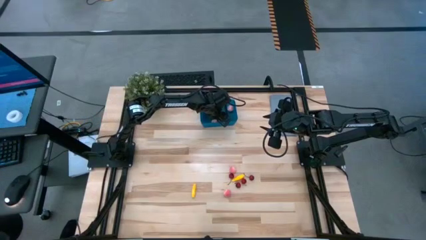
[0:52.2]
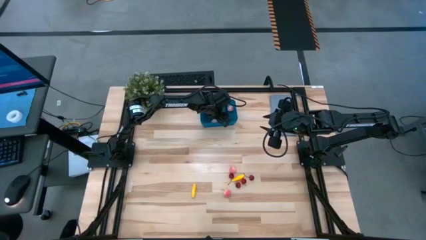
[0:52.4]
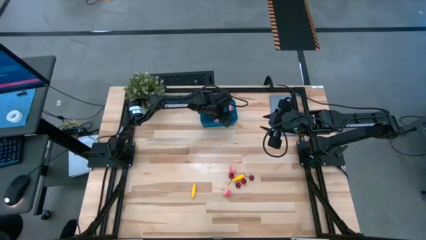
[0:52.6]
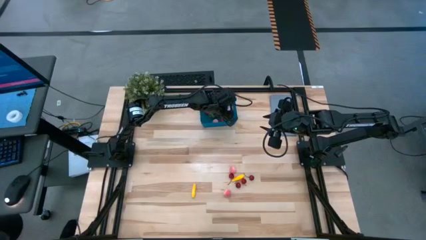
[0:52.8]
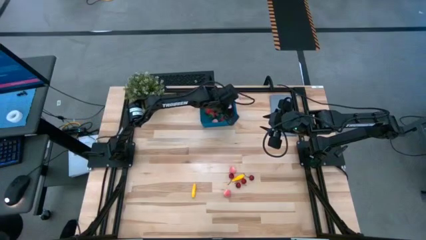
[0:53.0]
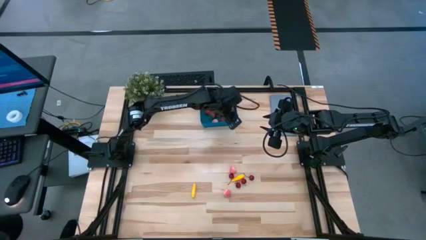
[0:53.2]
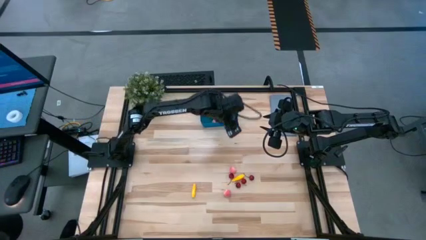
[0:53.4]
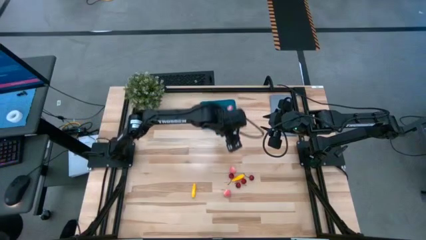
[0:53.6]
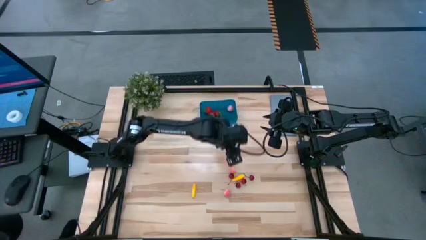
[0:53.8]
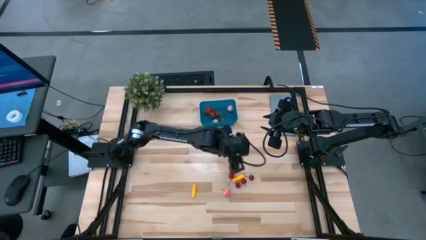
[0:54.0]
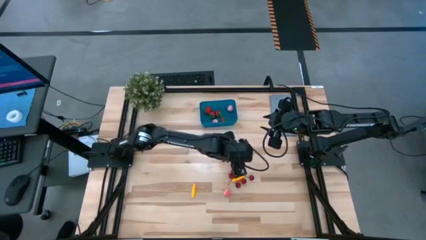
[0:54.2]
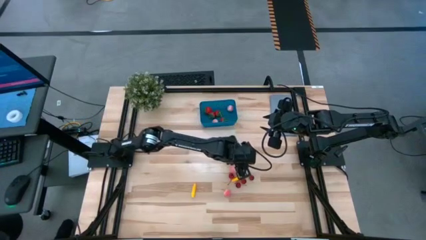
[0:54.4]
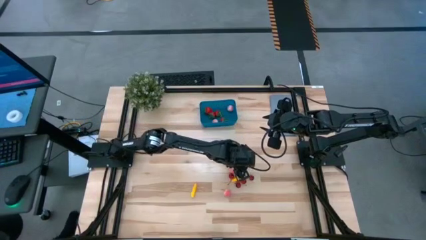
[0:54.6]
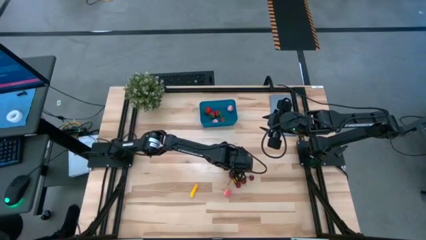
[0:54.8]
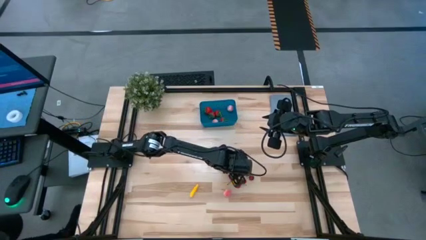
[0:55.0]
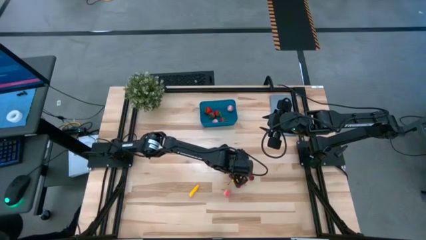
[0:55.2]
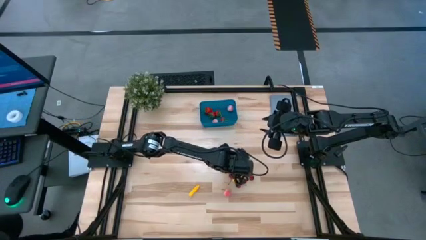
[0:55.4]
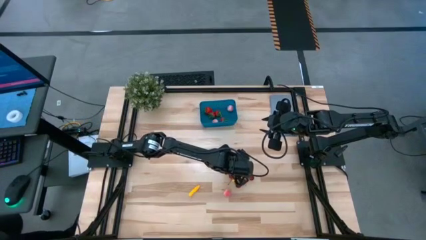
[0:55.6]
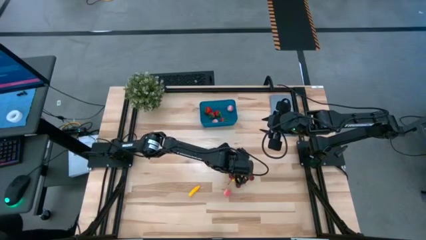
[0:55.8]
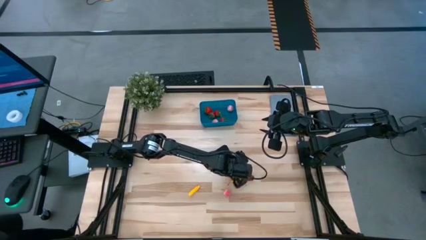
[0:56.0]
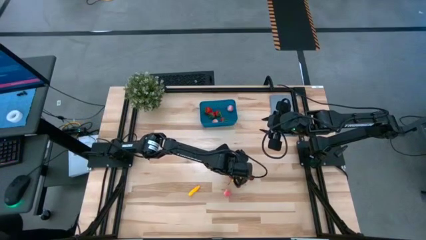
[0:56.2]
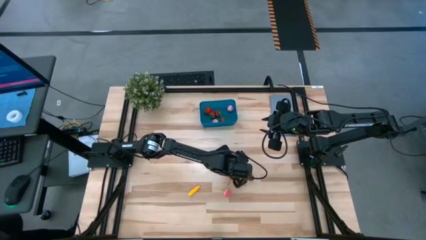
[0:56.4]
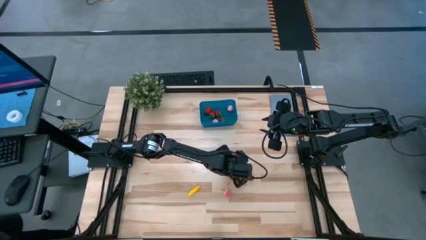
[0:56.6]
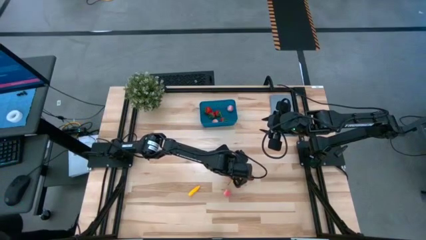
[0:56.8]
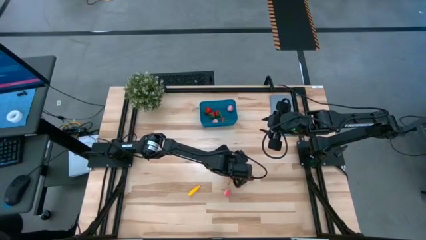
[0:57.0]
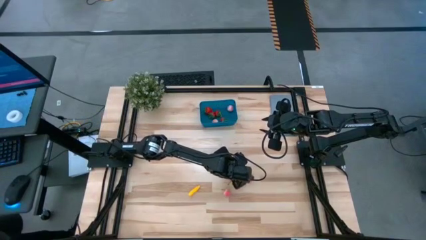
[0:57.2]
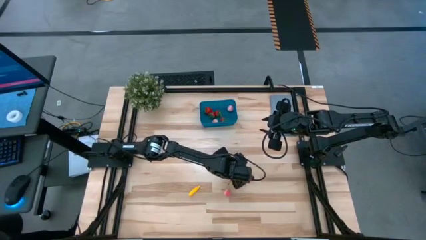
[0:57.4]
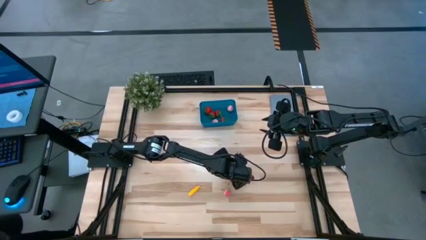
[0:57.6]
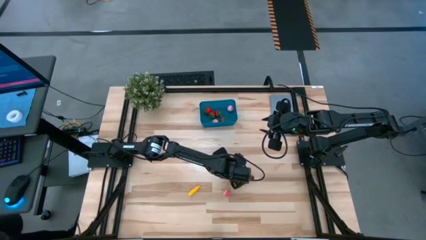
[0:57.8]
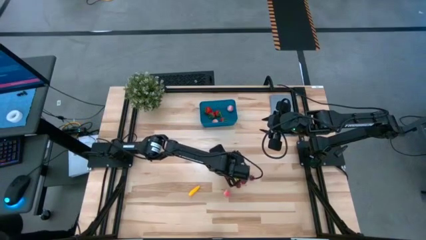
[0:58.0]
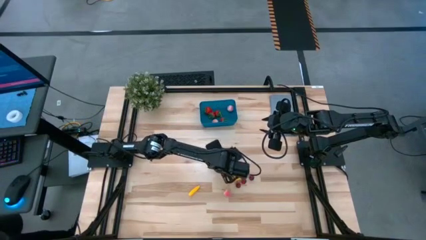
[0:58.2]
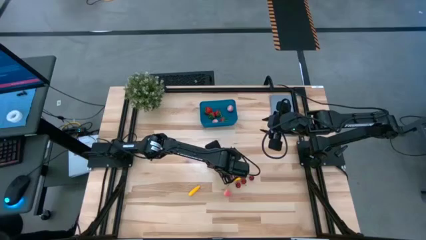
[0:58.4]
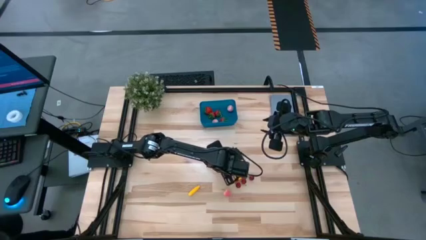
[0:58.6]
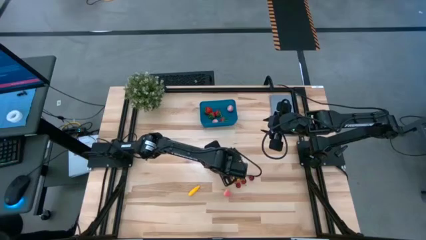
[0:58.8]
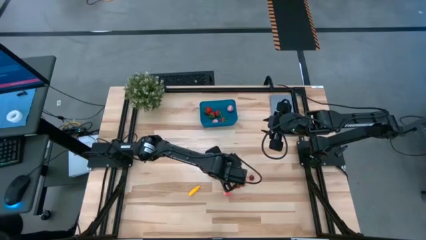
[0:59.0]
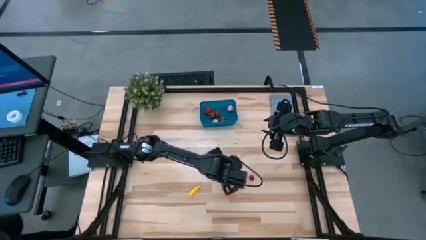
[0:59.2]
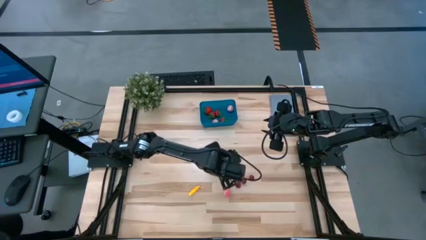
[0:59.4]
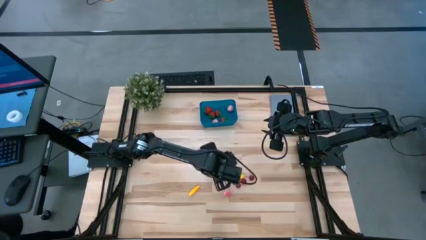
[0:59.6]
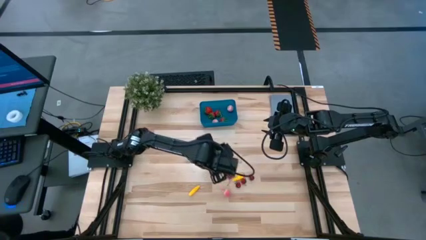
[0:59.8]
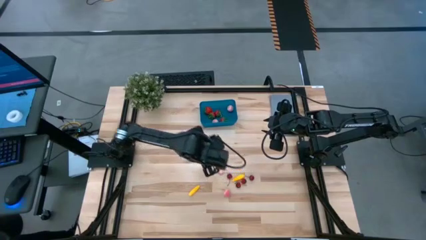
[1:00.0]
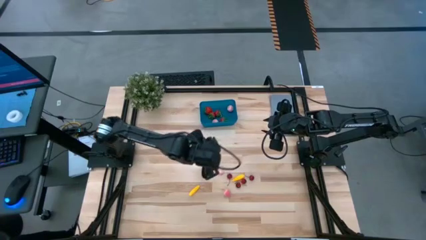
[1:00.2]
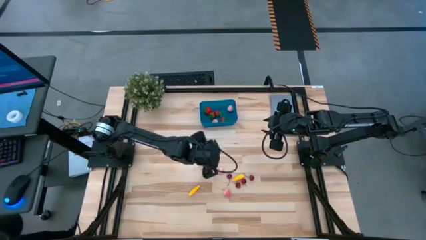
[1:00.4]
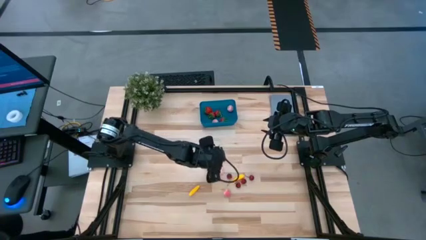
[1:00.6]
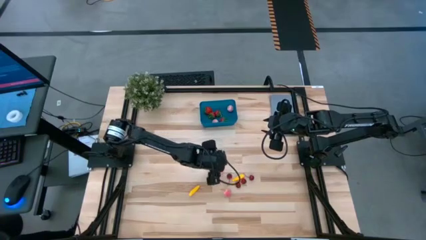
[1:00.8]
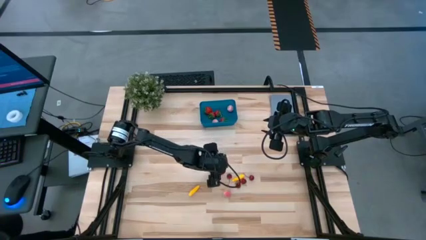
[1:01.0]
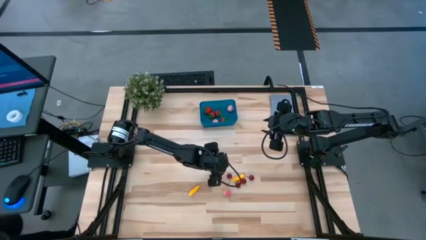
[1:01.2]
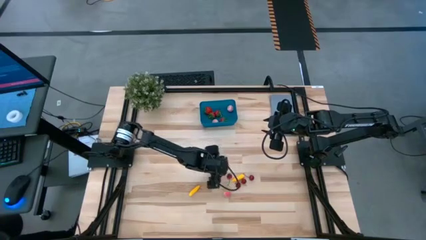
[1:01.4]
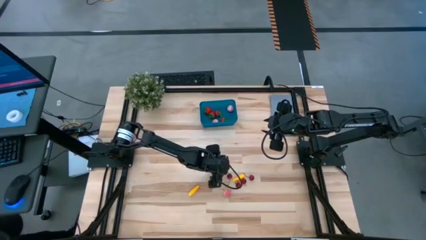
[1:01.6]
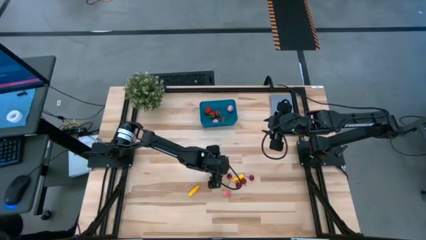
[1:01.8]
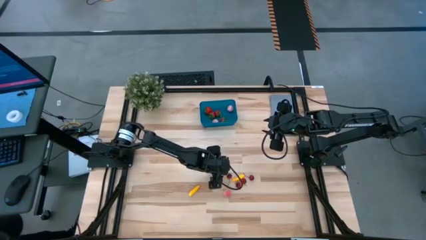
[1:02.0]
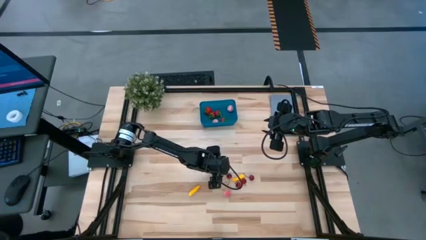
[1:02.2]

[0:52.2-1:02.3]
Task: Pick and placing Produce into tupperware
Put the top peach into the blue bin

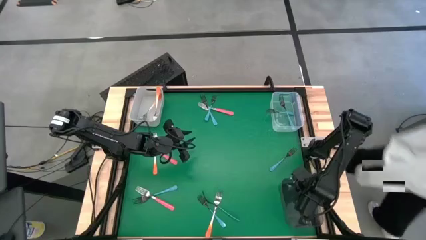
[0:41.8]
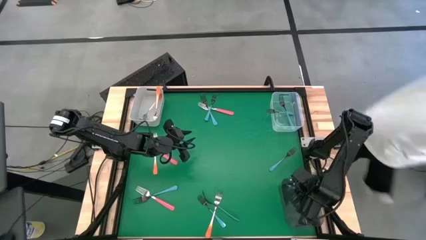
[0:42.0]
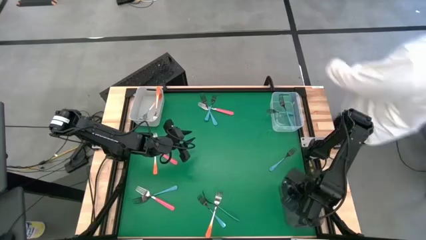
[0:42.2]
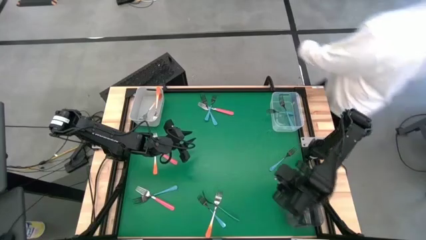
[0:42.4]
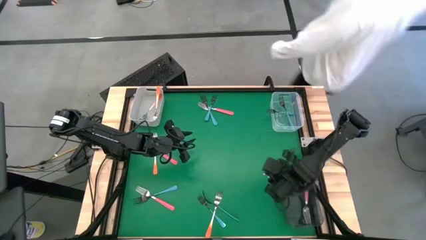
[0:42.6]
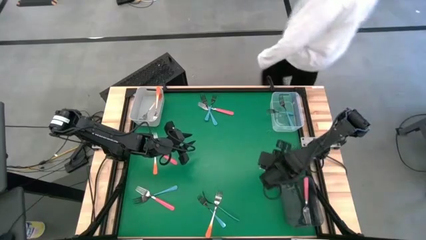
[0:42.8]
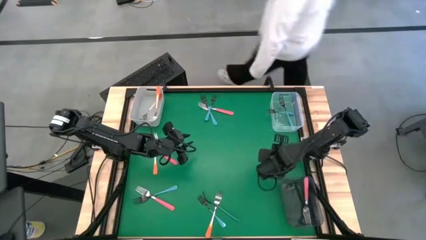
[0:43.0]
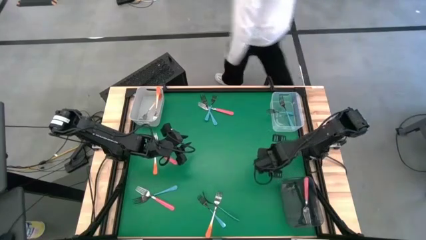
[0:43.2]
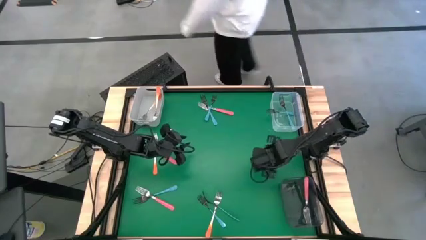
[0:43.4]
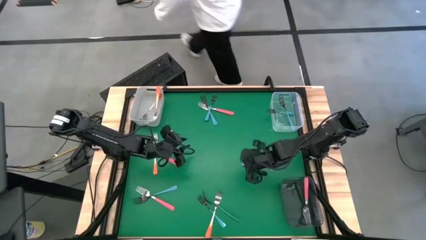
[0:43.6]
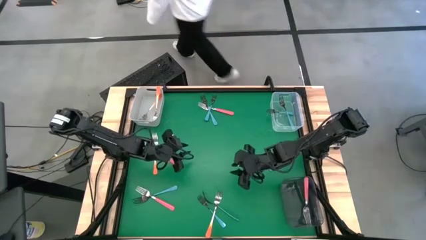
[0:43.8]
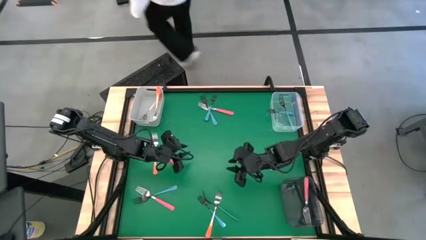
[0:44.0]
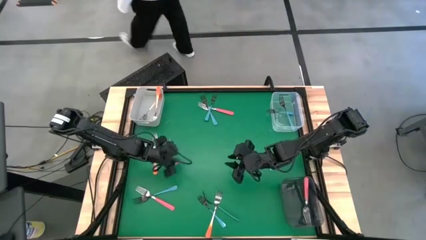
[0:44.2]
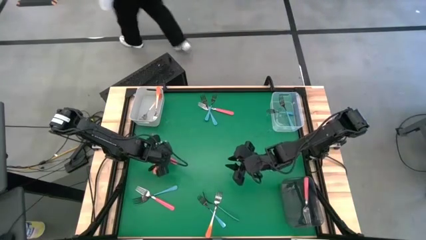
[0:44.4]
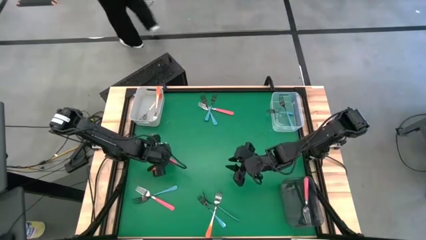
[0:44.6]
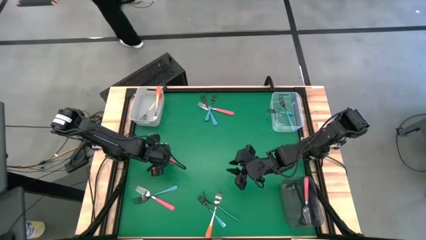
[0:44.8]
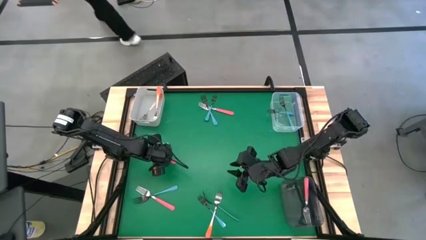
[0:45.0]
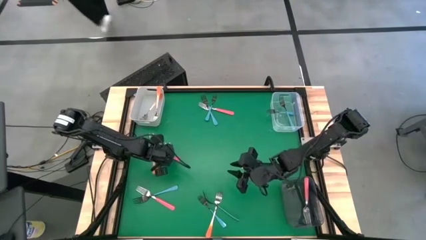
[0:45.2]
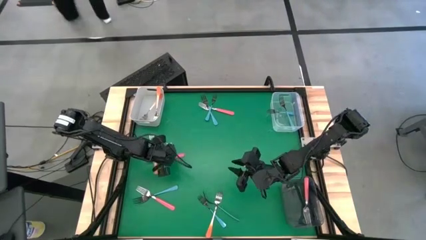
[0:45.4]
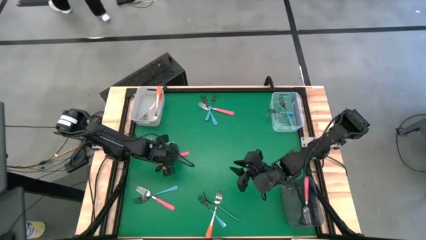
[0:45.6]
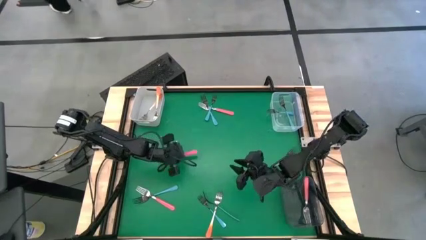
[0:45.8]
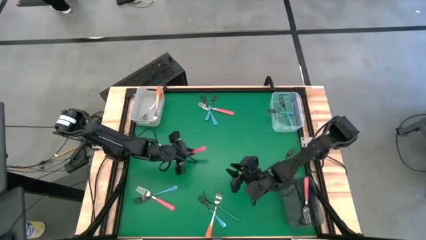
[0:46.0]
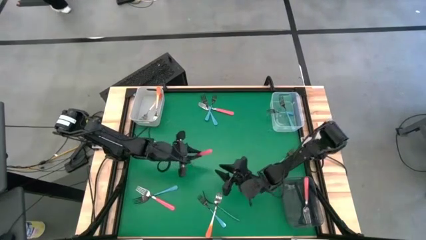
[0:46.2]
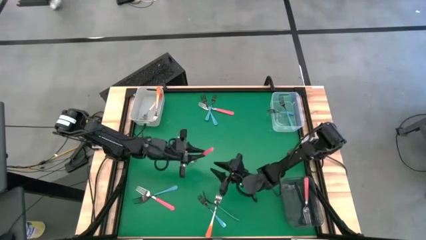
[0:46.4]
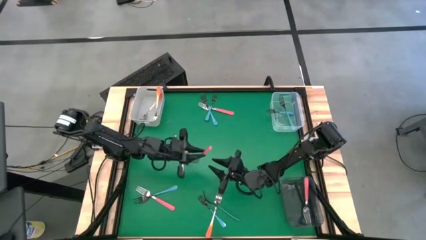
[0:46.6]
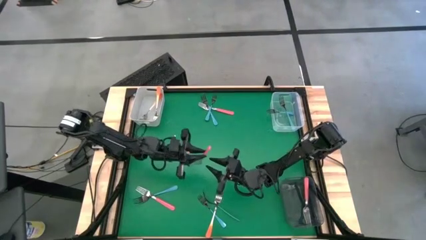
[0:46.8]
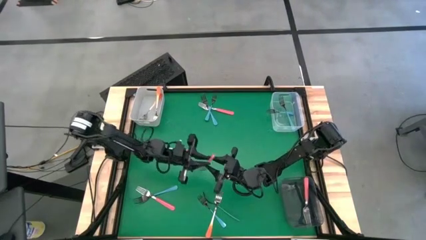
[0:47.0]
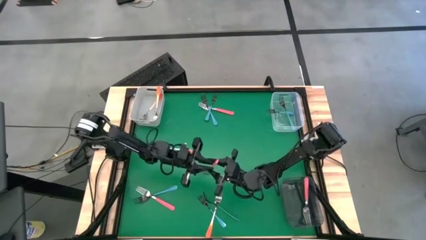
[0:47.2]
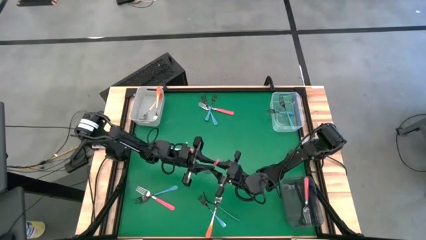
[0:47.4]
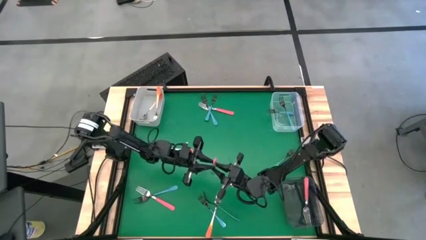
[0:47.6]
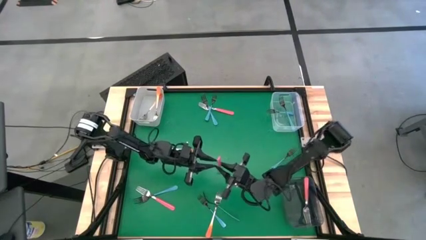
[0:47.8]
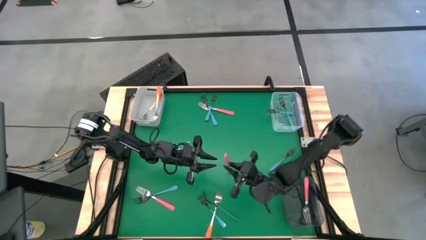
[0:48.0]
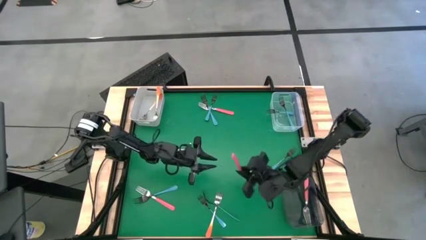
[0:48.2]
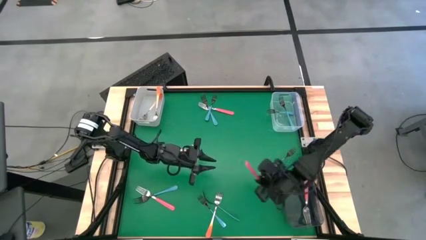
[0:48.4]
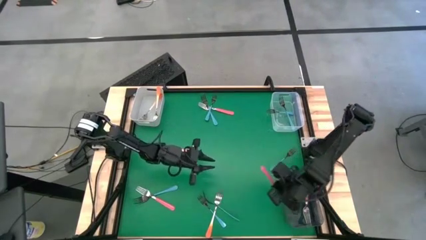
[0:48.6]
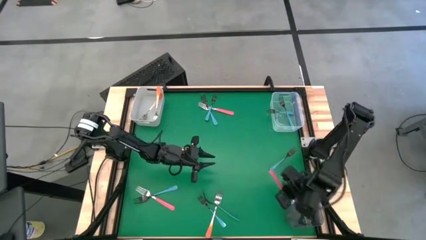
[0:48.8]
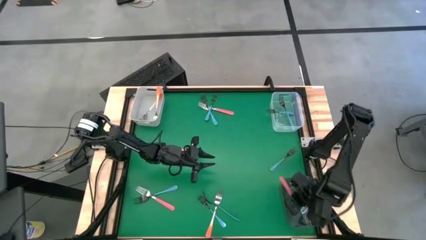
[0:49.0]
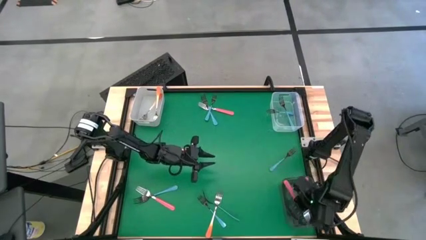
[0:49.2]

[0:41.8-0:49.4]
Task: Sort silverware by color (type)
Put the pink fork into the black bin
